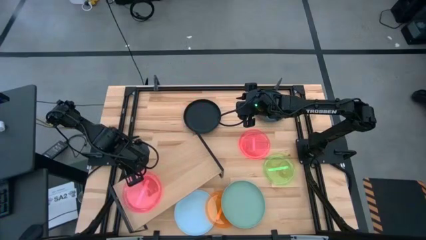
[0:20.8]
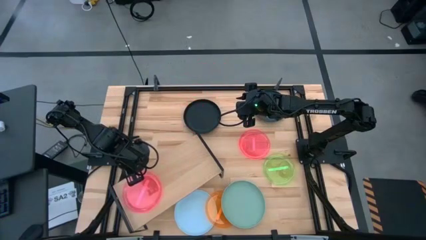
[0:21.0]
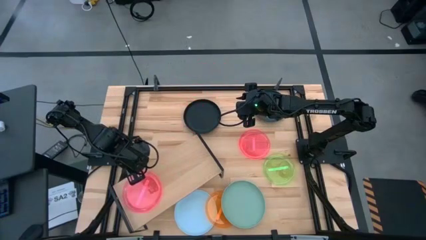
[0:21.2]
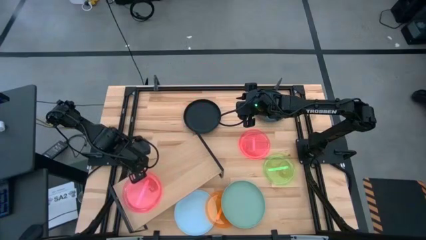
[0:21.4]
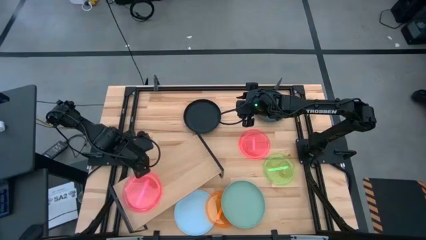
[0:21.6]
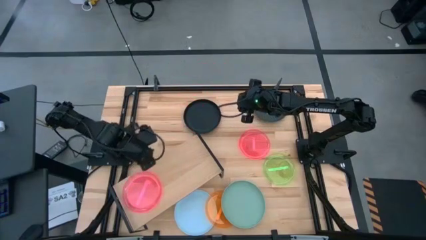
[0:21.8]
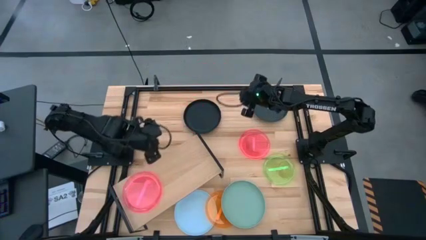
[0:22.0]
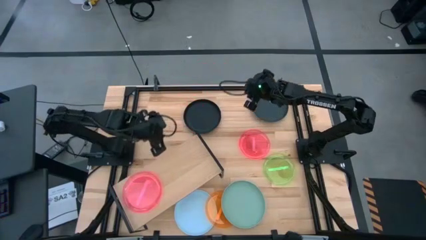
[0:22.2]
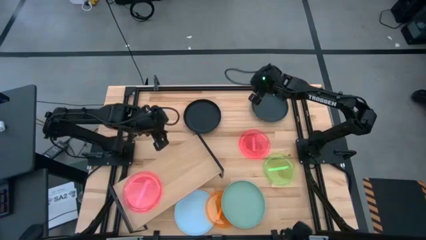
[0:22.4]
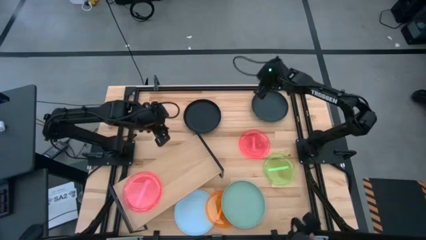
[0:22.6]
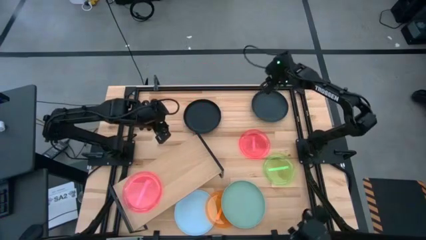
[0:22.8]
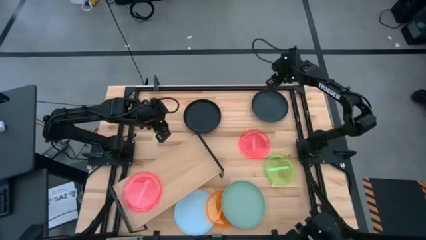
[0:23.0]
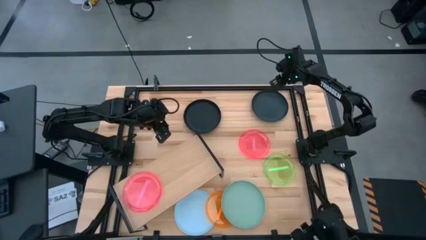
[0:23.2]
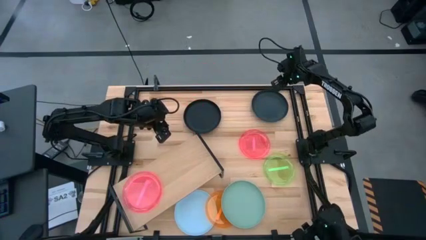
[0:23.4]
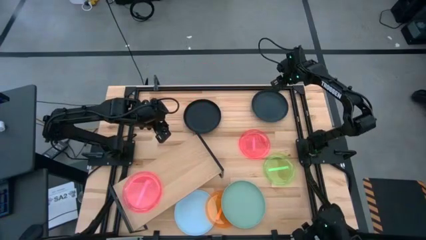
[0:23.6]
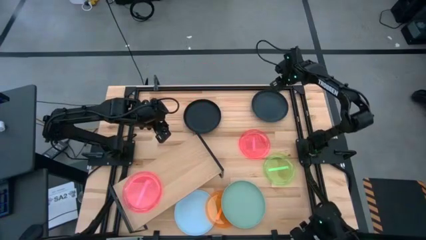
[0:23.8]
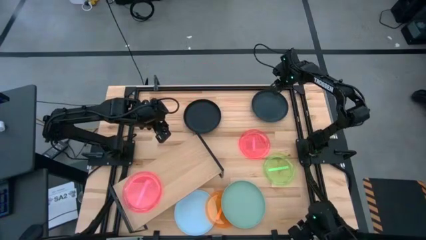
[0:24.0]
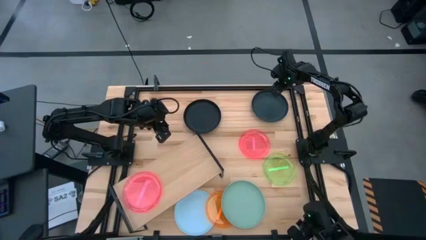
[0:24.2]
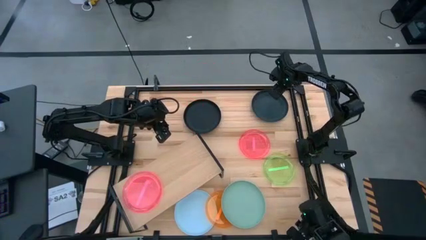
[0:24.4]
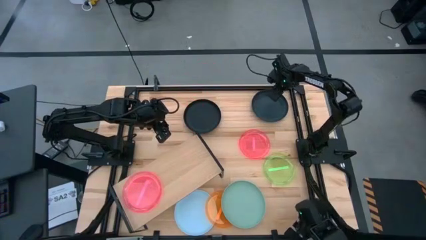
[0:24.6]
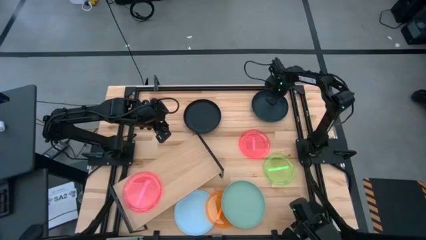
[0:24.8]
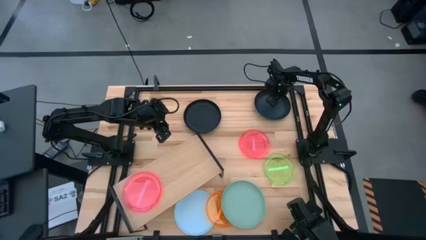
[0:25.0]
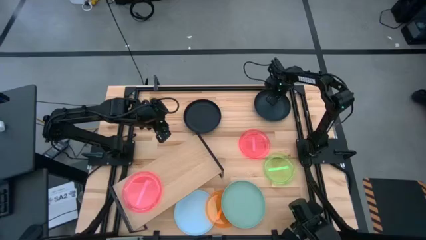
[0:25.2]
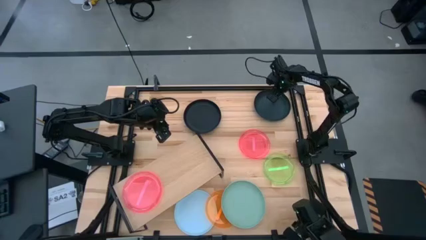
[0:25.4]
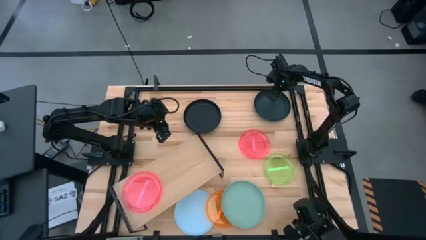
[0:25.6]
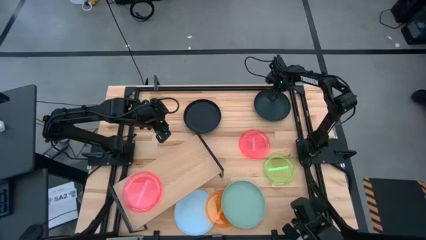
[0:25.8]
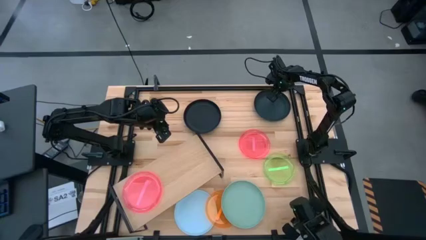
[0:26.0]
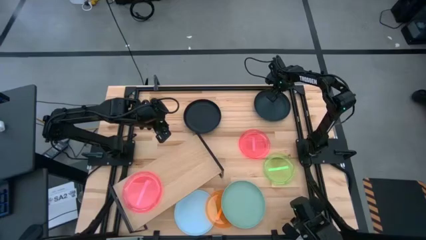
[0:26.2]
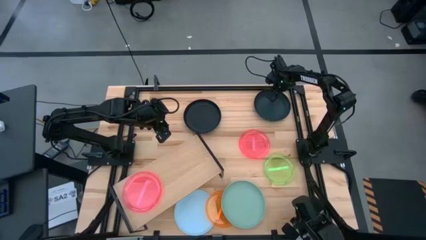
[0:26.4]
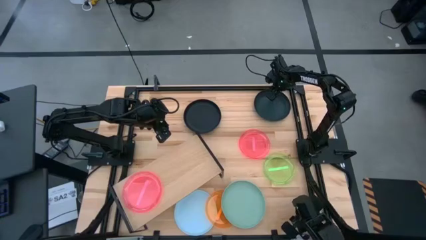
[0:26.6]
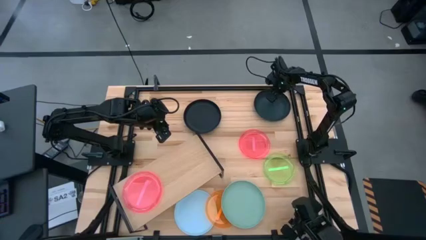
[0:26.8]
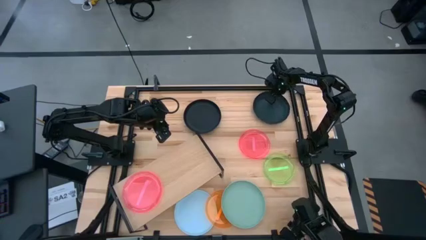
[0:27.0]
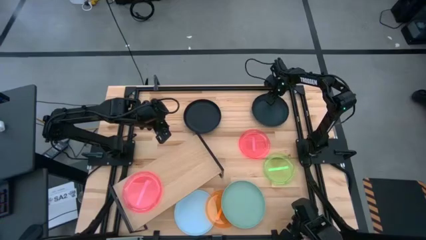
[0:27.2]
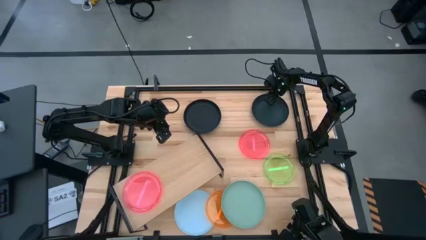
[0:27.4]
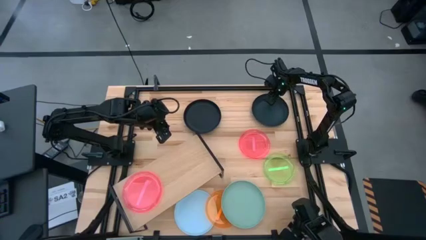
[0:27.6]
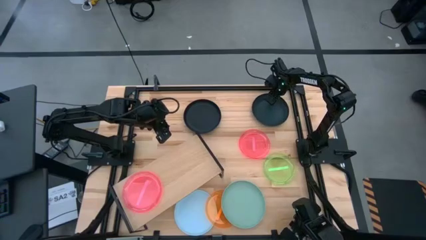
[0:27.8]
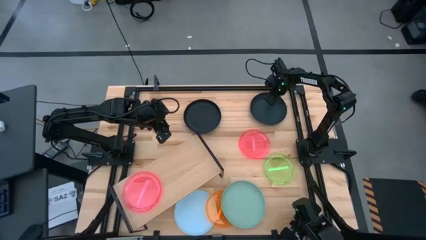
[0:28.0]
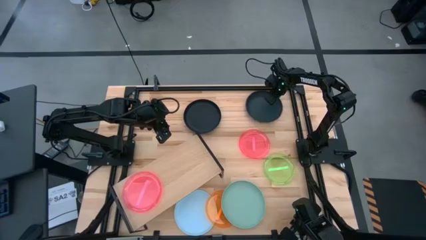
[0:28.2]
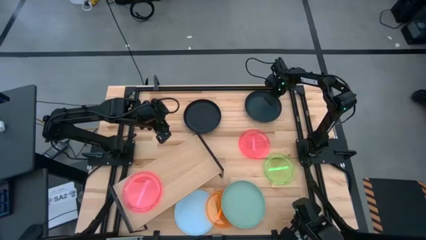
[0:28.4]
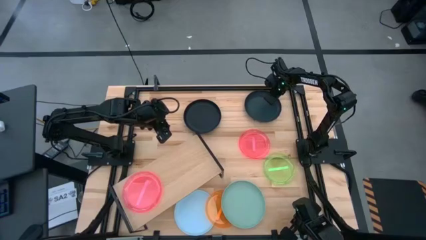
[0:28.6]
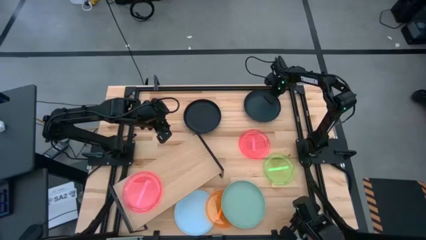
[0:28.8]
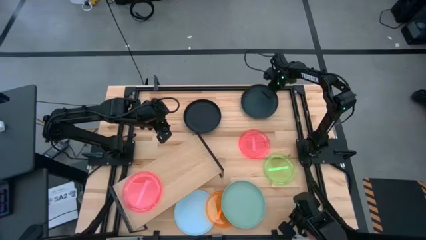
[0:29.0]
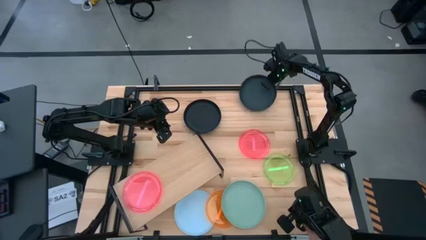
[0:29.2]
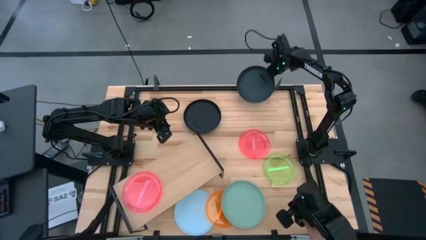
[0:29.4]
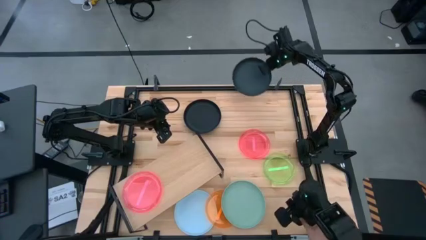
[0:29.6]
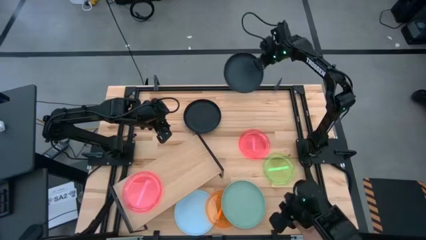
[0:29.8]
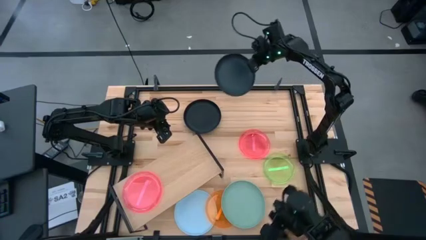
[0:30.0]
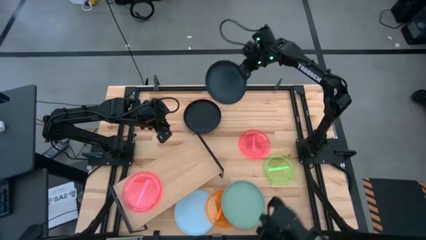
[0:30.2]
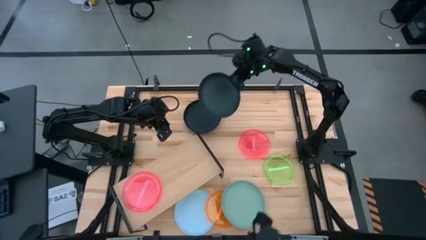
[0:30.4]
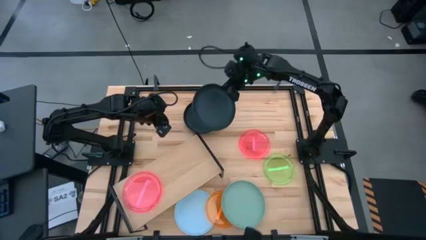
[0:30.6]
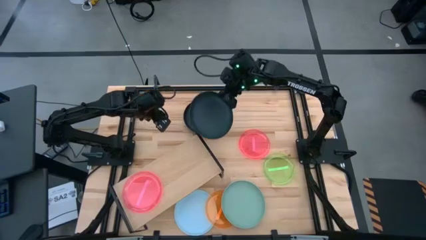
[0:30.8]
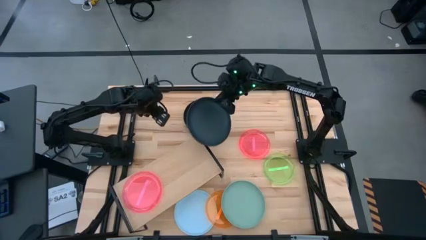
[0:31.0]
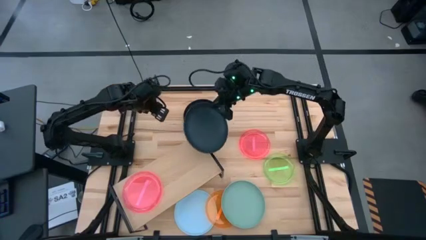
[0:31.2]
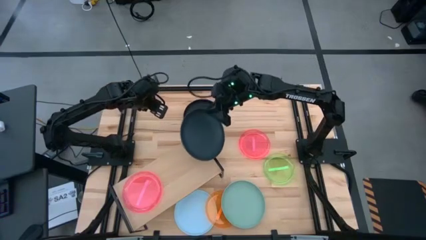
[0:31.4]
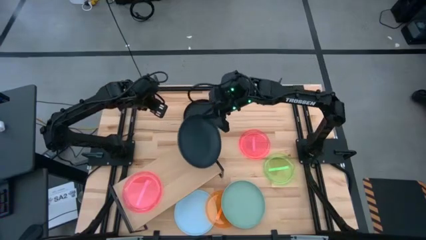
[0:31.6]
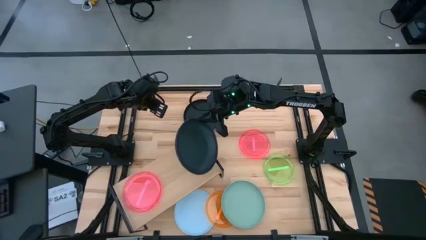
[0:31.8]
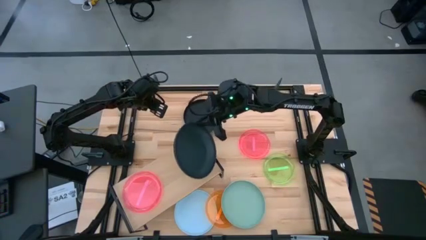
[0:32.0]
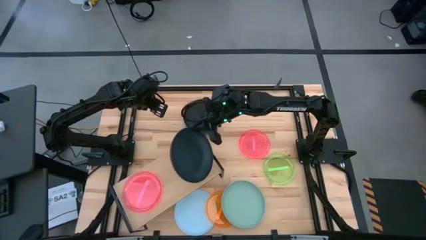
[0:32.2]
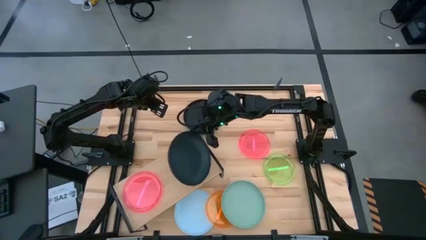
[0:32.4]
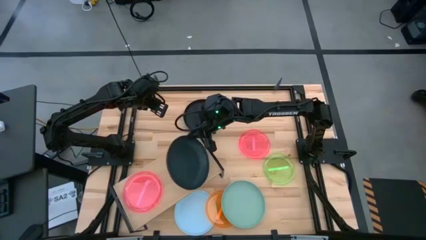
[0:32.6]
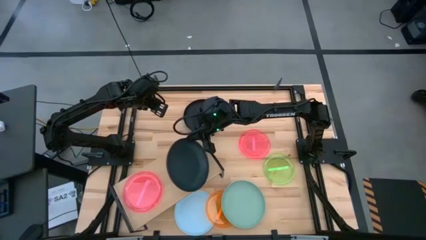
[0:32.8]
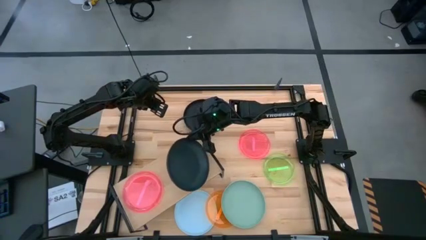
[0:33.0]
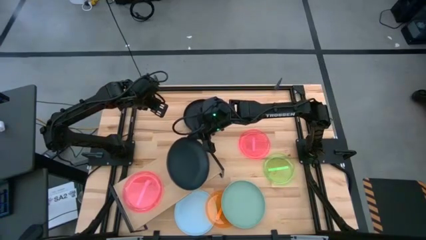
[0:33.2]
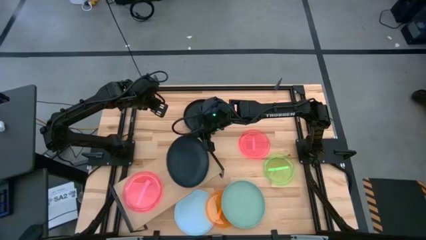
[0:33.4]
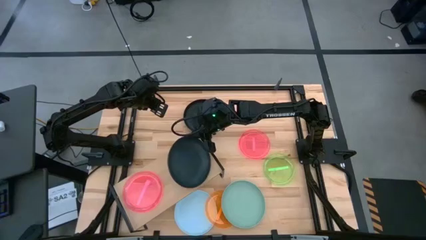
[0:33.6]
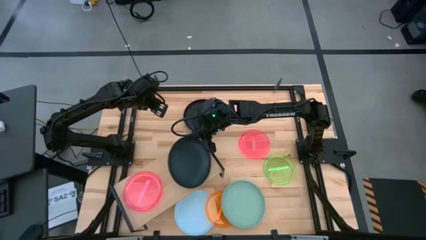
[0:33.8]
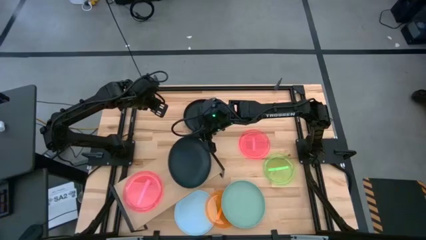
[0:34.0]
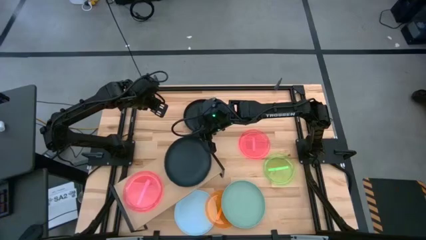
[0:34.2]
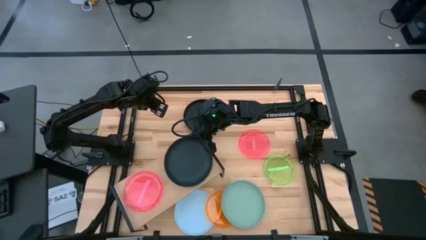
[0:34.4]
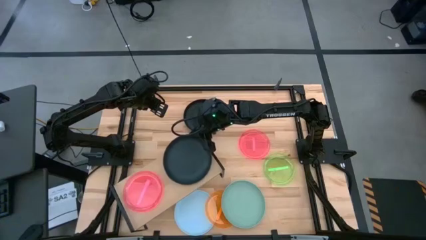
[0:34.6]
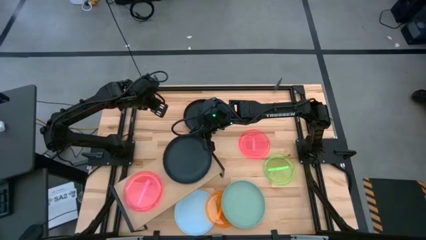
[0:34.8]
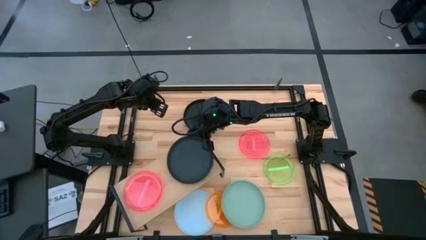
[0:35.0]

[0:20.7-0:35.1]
Task: Place and stack plates onto a shelf
Put the right black plate on the shelf
